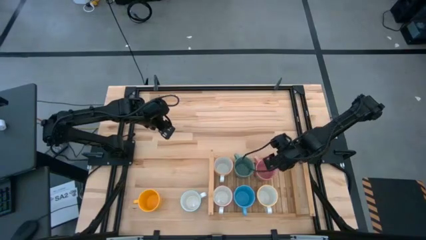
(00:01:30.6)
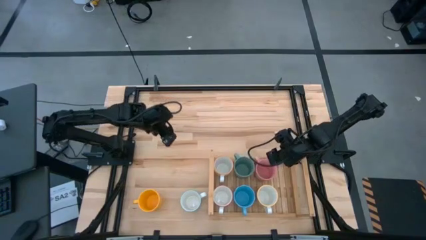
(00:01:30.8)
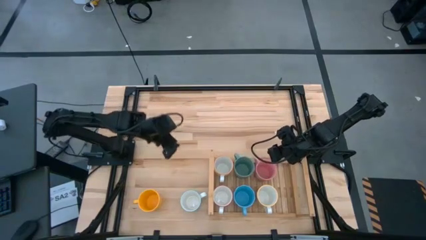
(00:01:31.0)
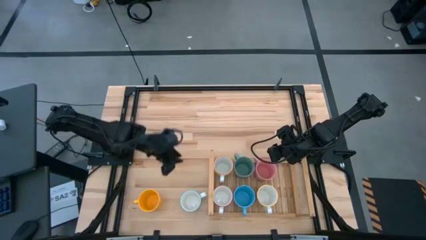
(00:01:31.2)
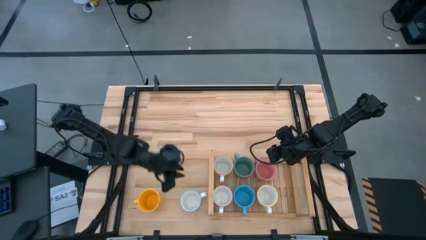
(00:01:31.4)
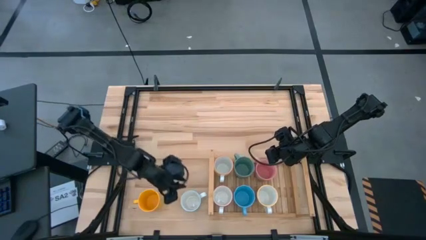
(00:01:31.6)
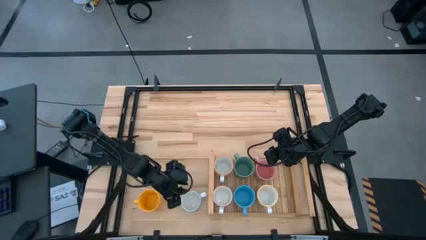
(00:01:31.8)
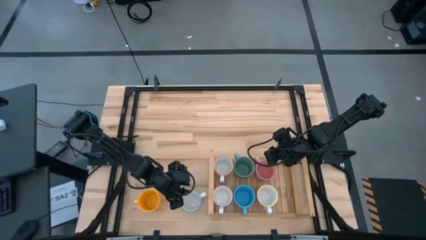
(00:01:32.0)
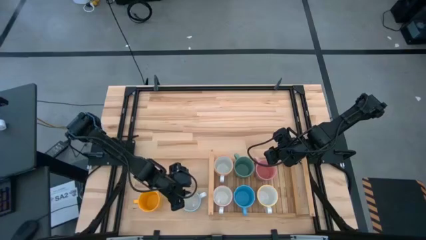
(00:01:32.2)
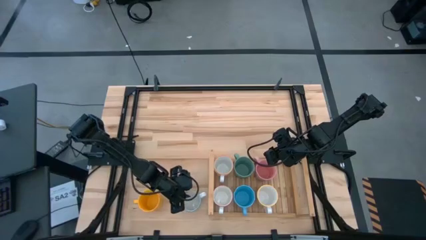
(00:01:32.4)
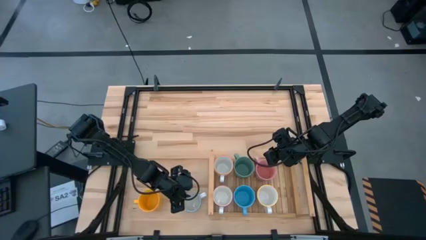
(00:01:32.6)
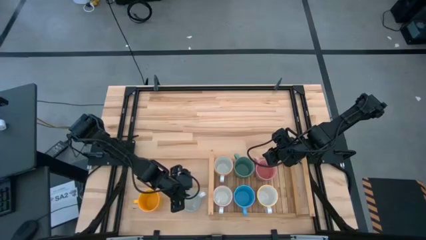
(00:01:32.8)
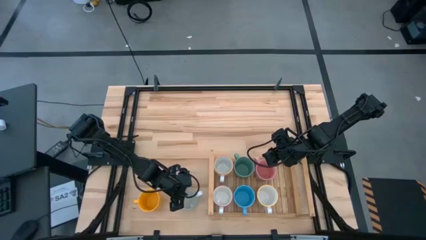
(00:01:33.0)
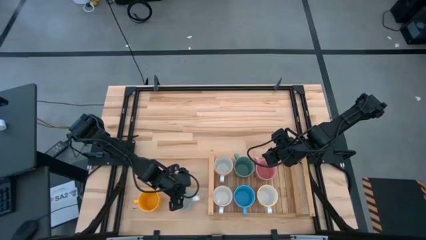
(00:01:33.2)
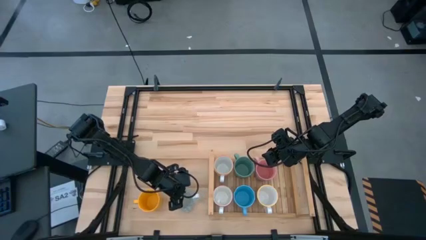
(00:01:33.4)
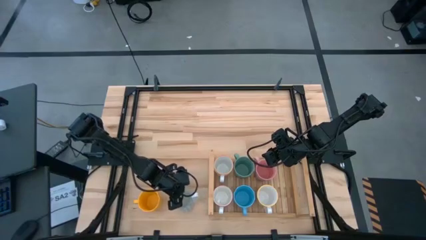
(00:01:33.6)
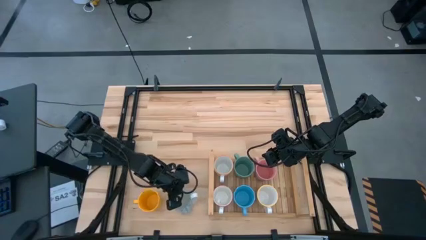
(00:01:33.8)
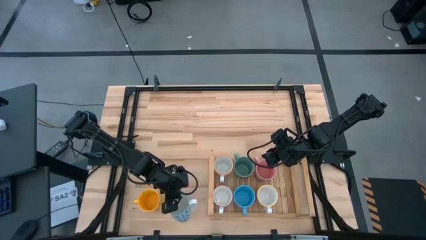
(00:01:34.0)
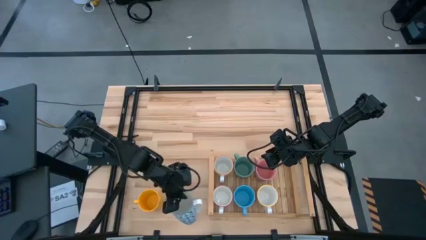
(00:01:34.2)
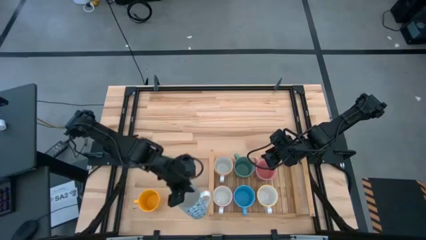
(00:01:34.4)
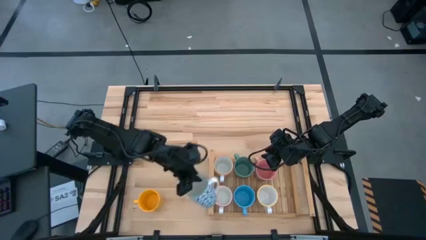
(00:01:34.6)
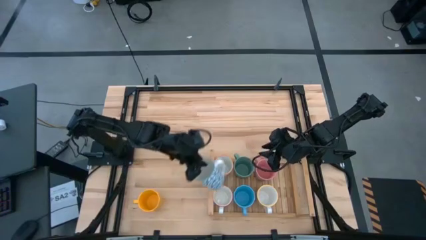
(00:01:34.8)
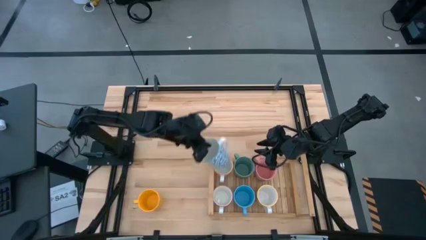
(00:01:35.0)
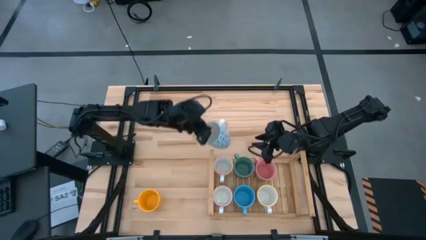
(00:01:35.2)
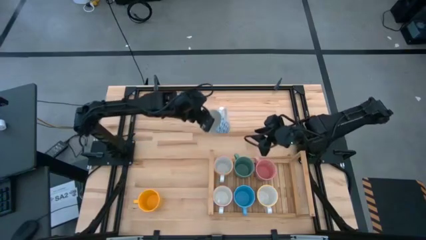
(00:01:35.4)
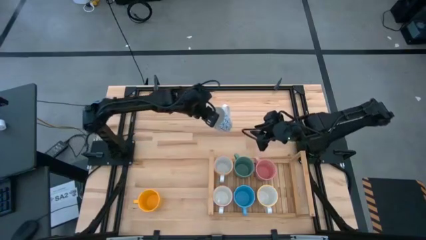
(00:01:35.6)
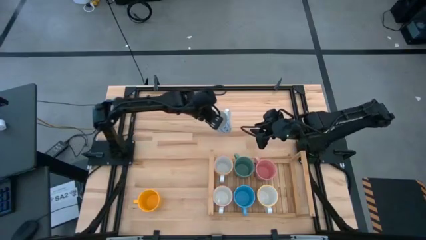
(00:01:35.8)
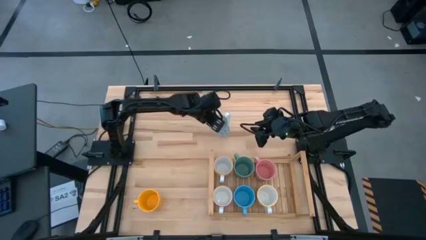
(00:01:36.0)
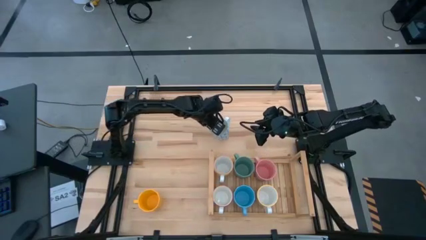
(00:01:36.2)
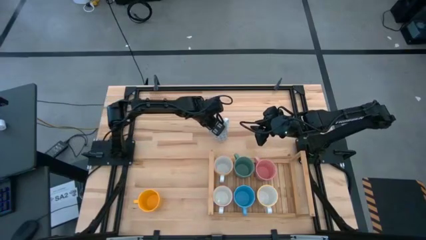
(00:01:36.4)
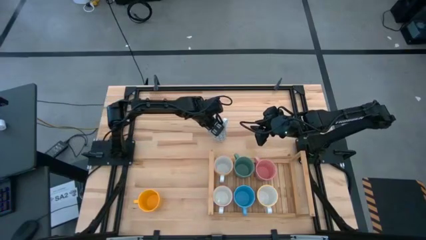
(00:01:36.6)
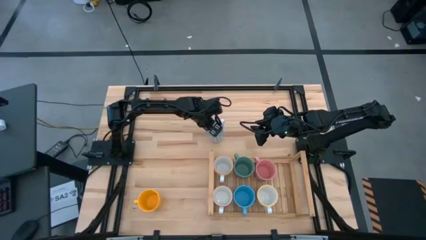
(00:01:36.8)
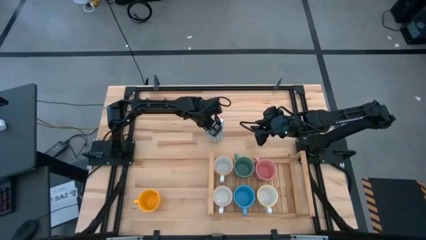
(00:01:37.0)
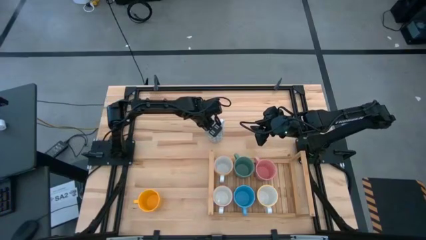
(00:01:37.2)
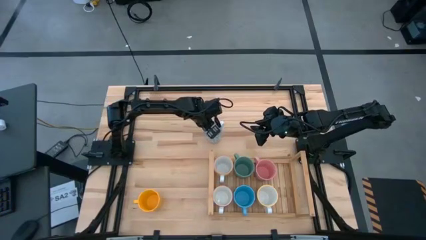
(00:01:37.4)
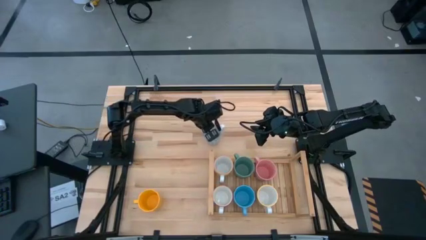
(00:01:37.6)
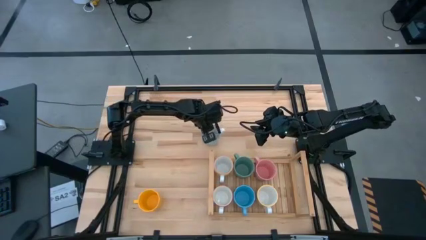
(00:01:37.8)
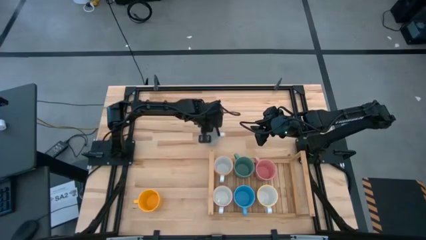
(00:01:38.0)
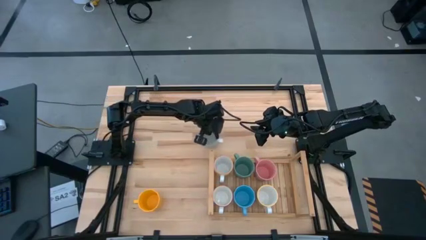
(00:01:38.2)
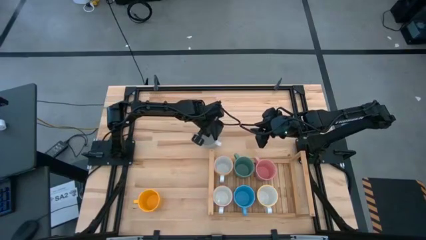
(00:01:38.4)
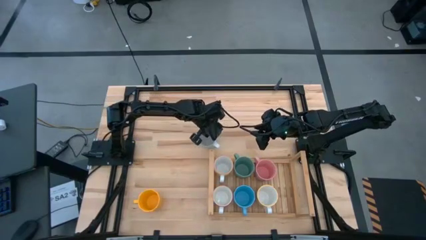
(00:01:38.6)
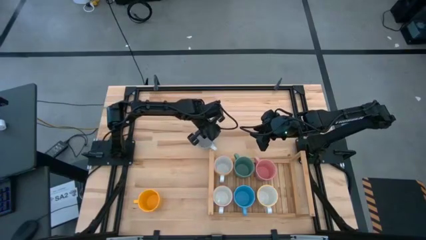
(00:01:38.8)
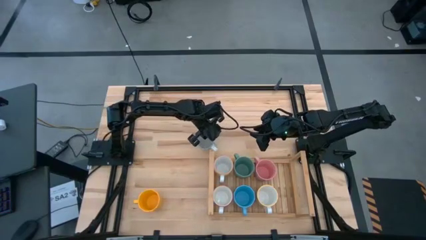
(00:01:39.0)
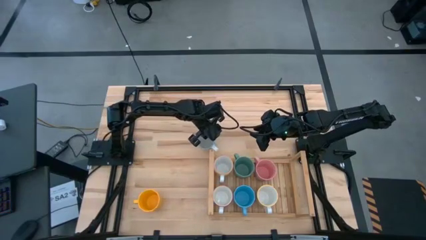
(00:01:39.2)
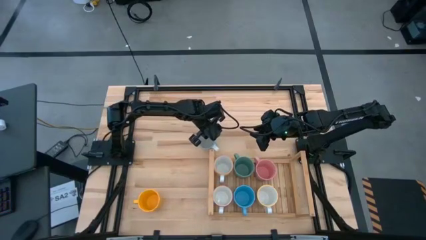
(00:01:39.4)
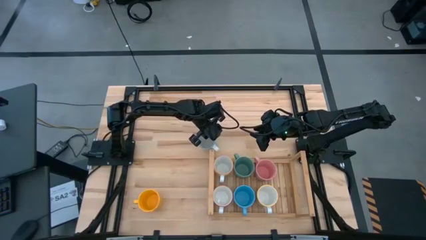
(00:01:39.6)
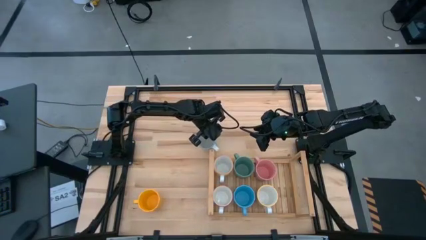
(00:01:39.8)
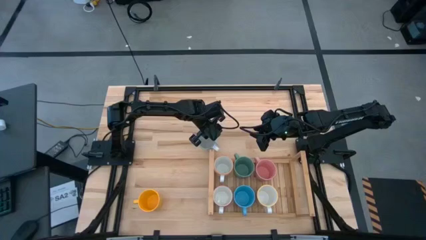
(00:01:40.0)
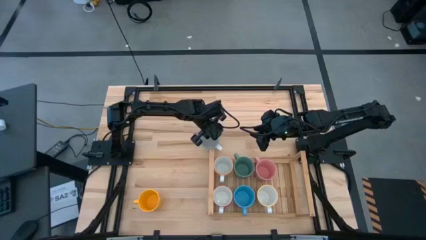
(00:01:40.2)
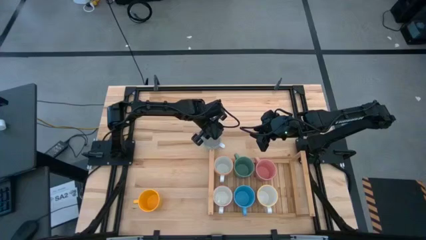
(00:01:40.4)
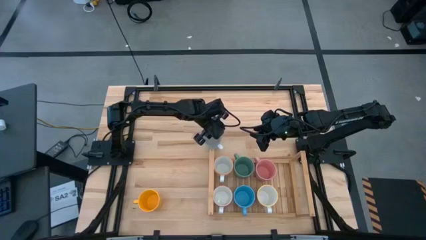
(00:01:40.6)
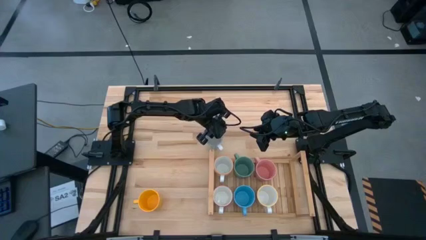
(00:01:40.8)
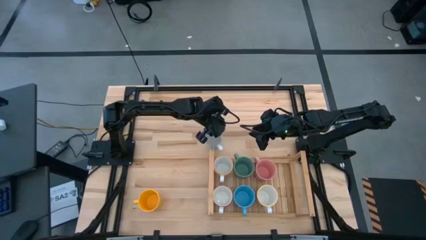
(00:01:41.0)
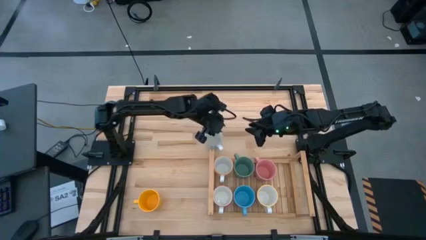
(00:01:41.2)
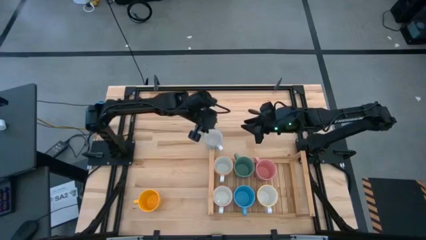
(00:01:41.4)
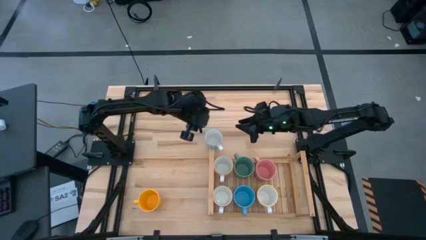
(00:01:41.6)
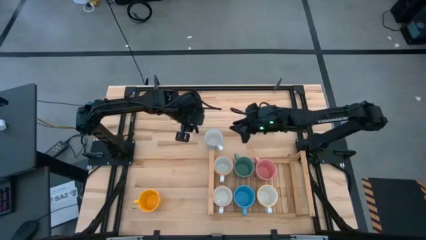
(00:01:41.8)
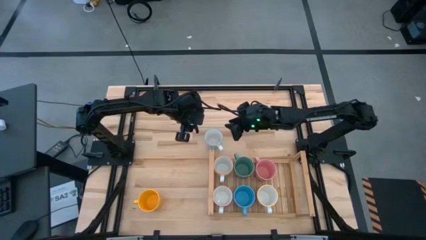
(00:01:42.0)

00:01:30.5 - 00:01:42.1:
Task: Place coffee mugs
Put the blue patterned mug on the shelf

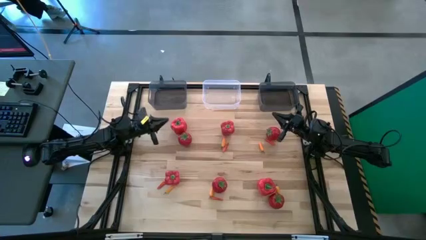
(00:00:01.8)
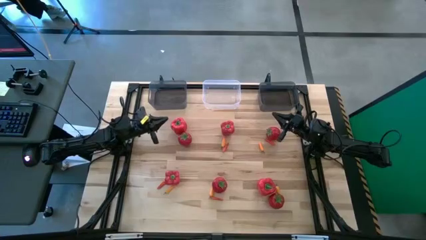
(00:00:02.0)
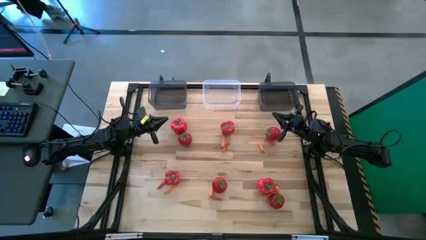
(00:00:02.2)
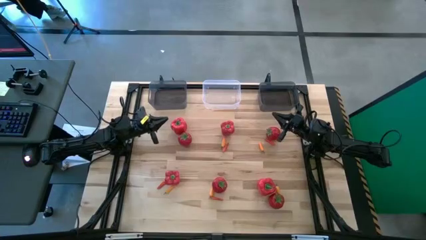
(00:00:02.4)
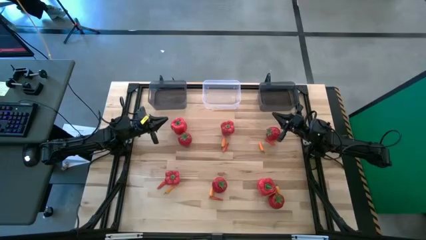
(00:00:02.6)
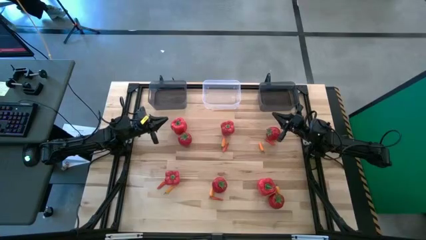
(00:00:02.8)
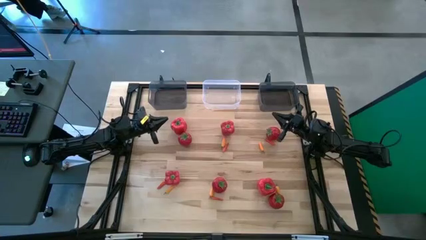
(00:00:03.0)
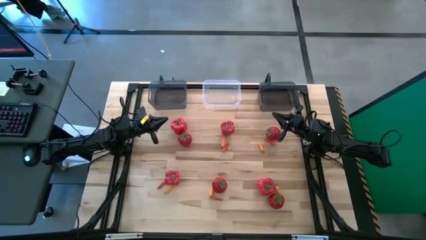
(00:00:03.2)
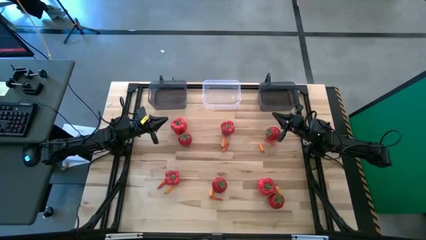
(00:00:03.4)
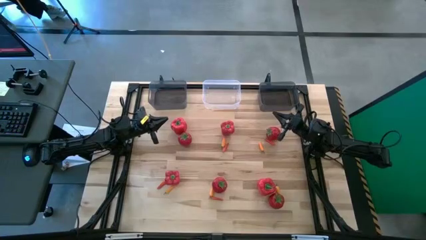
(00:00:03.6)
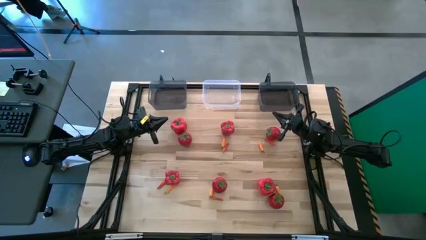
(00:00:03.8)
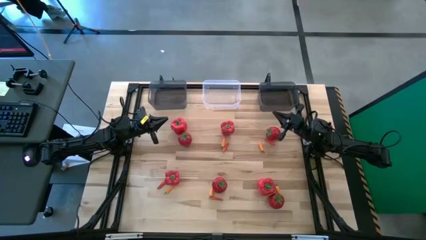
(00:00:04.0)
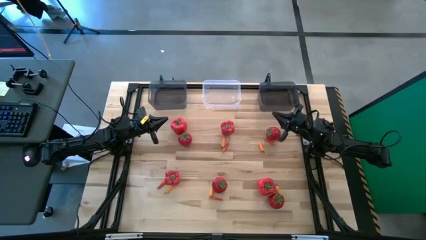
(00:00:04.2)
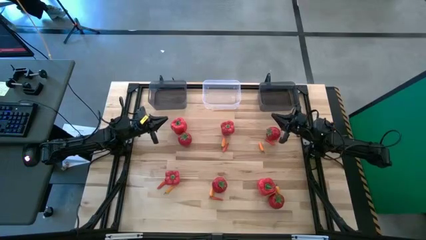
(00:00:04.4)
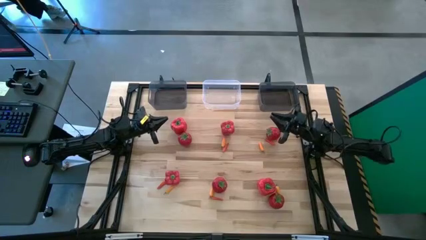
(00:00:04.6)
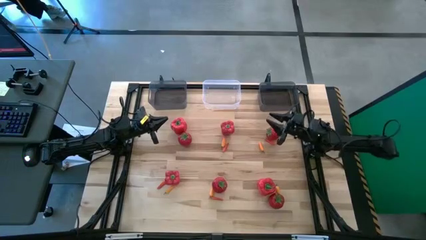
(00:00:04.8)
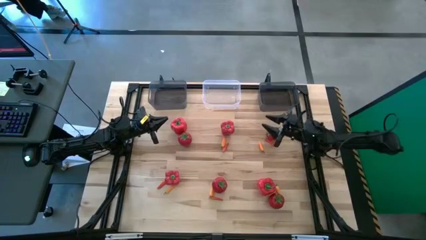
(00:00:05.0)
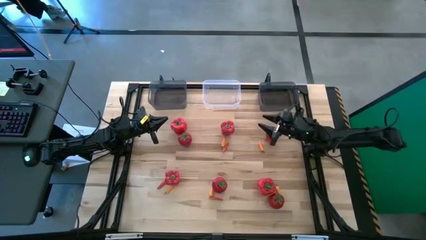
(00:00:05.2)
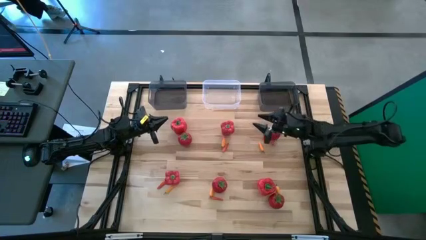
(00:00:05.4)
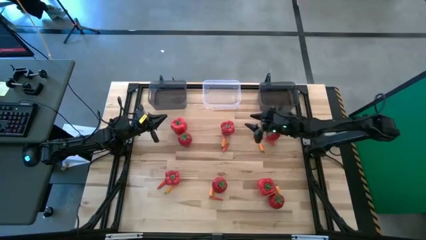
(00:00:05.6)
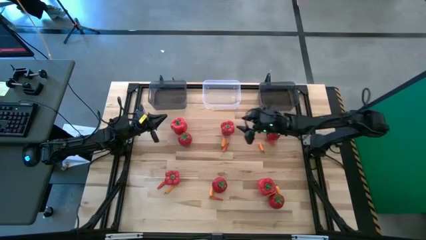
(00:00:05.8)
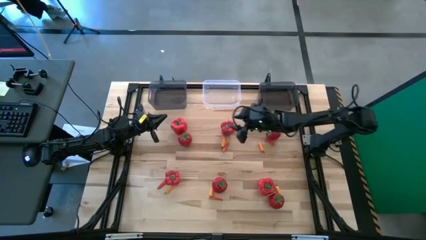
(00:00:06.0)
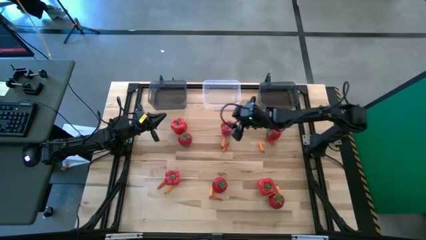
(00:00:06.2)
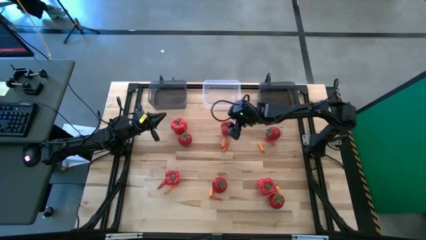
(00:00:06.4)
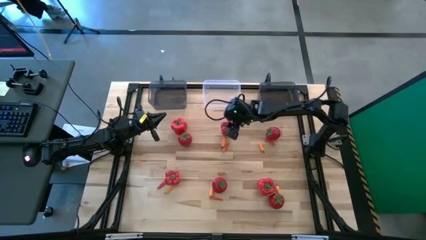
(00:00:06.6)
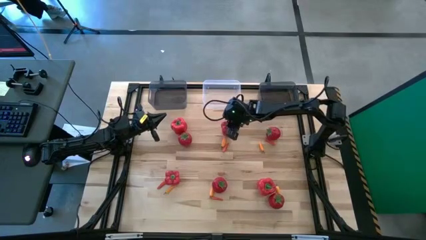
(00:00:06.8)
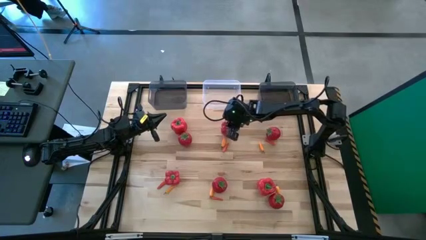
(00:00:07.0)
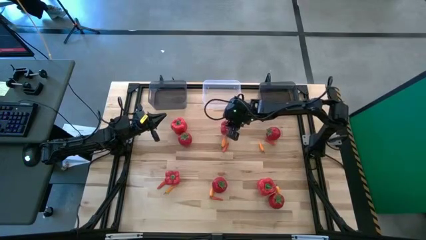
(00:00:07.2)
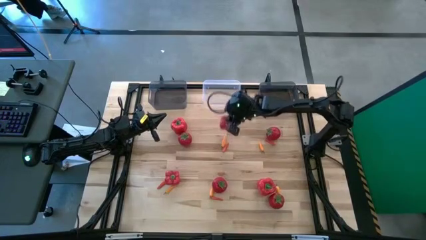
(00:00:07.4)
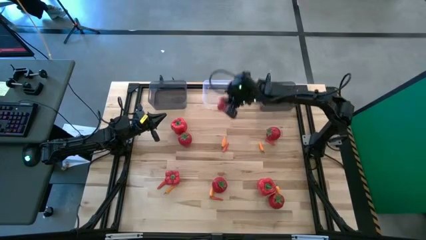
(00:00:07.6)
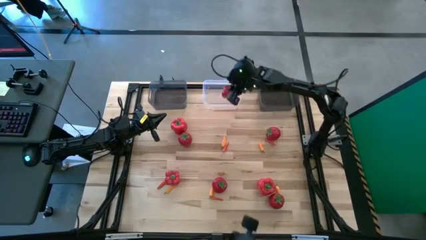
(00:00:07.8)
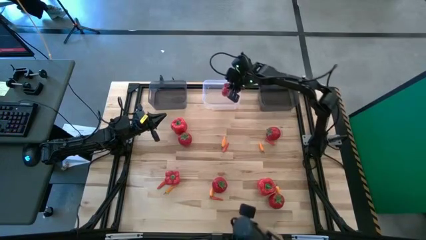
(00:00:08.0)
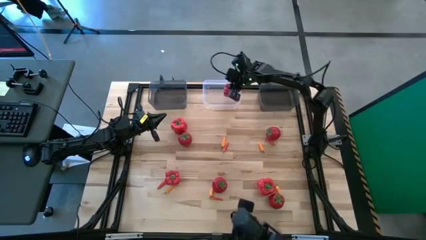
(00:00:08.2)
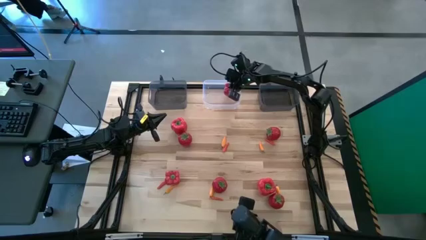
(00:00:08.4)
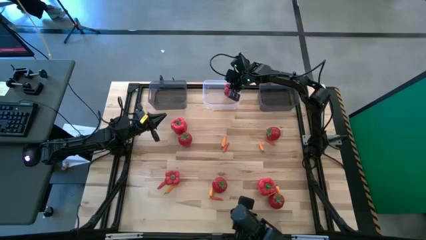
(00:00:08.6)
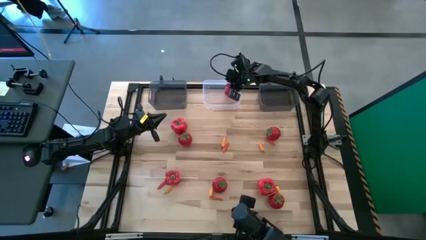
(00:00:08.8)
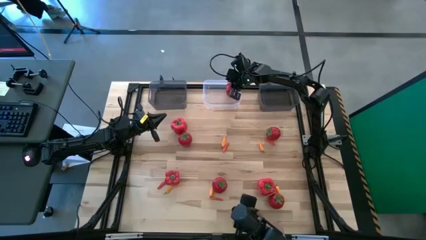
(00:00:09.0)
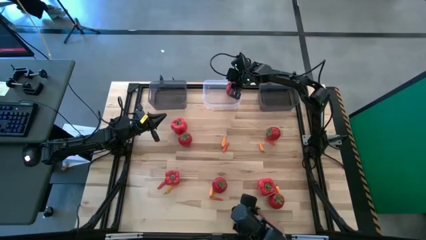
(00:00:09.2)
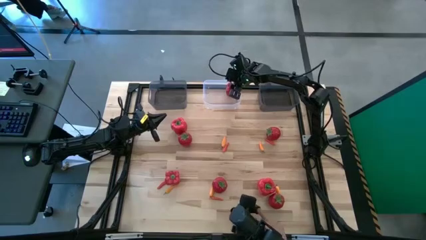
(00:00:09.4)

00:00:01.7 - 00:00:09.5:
Task: Sort produce into baskets
Put the red bell pepper into the transparent bin
